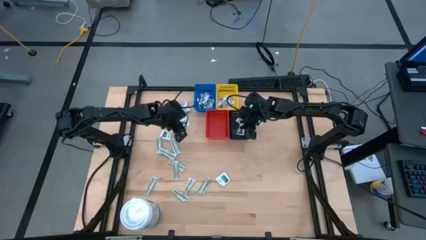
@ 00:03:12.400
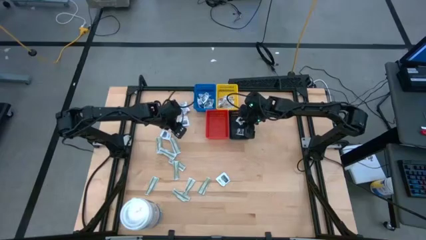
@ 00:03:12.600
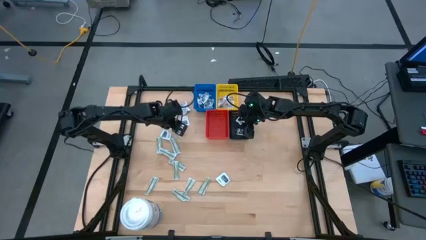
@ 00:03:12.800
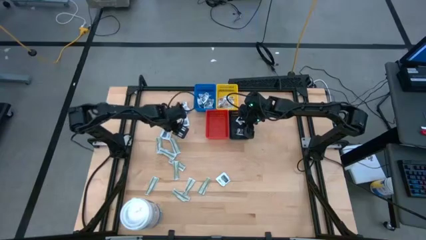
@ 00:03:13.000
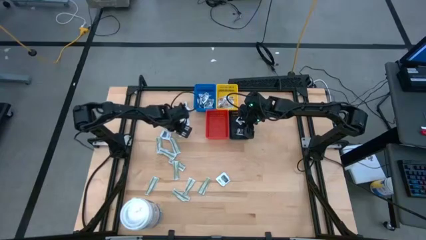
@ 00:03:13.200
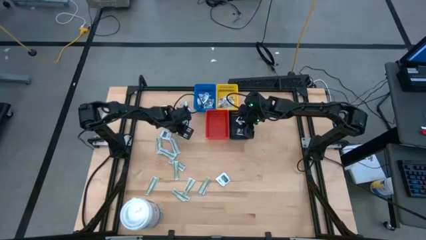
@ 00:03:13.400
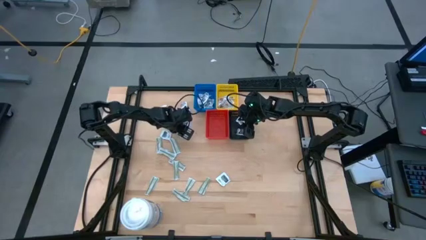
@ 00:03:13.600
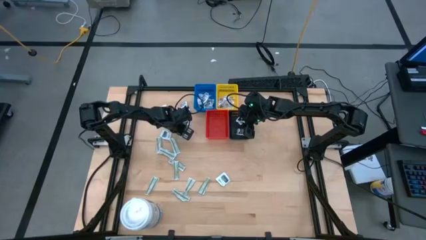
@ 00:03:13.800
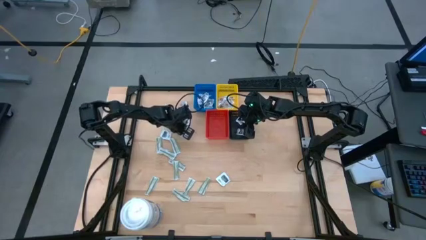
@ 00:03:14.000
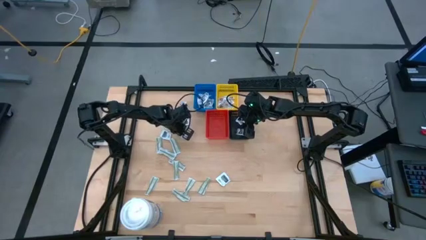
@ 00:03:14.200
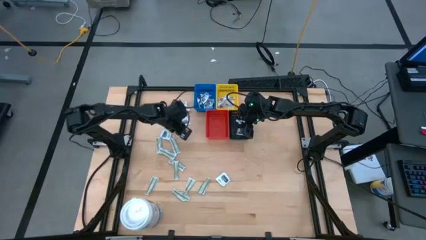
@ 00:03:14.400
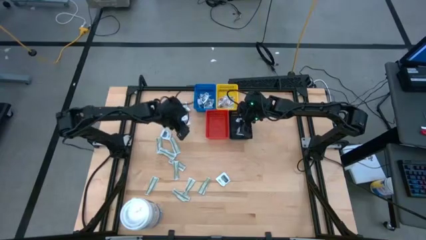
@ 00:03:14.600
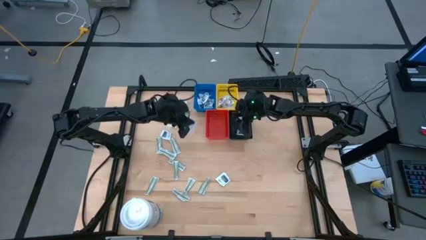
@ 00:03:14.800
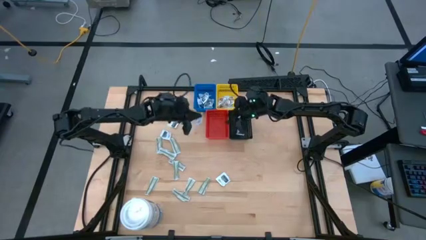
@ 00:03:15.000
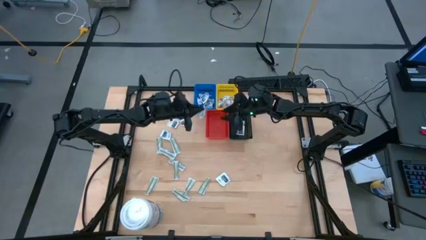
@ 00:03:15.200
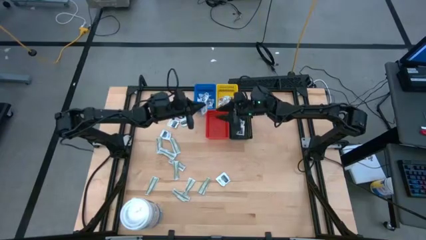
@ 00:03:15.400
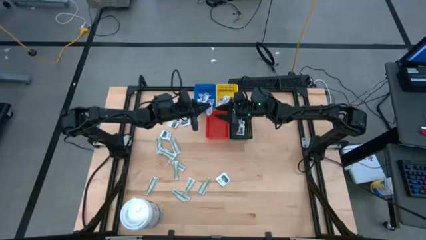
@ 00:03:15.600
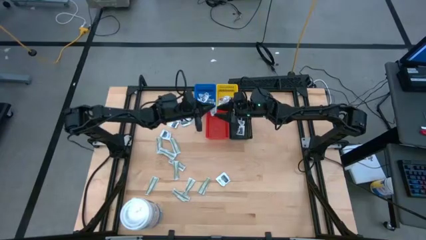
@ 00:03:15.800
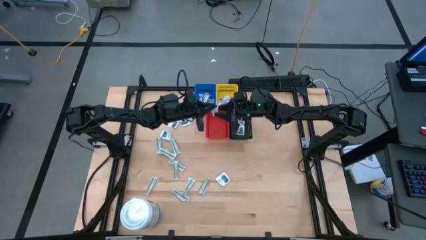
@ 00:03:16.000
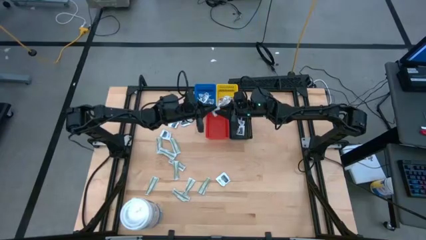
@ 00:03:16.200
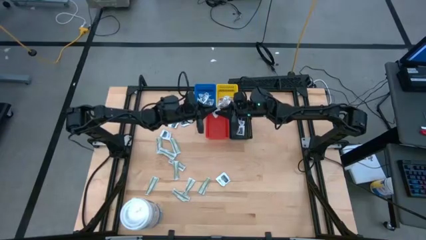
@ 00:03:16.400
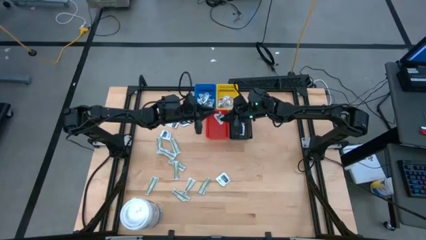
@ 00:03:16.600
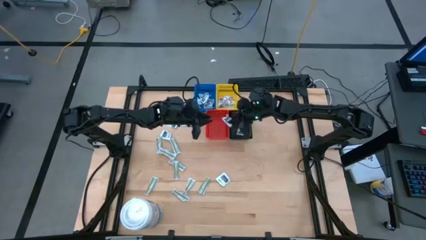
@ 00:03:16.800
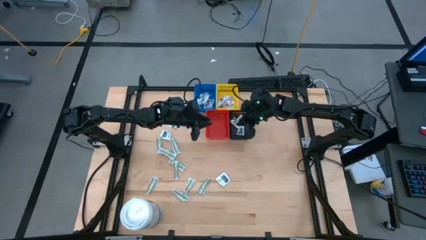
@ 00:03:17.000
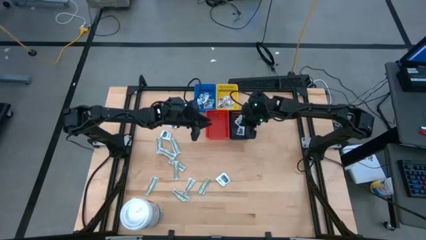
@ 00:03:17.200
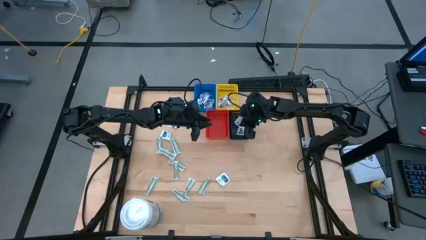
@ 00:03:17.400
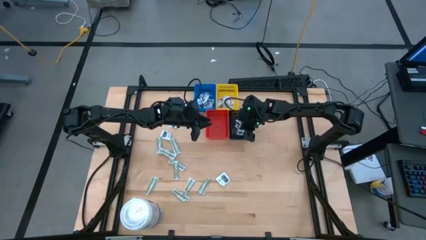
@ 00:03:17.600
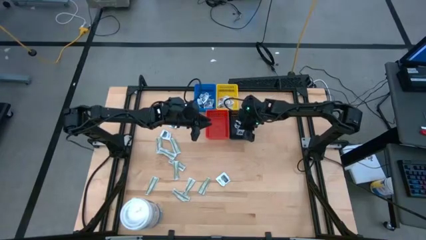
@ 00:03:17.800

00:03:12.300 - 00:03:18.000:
Task: Pick & Place First Aid Supplies
Put the towelette pack into the black bin

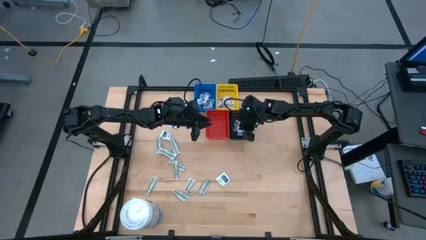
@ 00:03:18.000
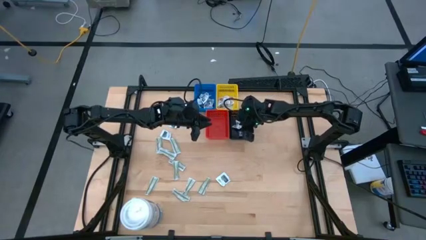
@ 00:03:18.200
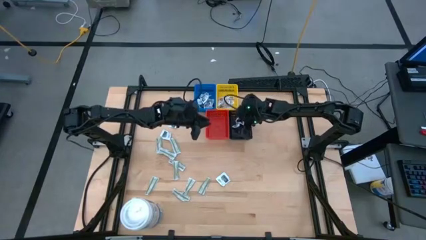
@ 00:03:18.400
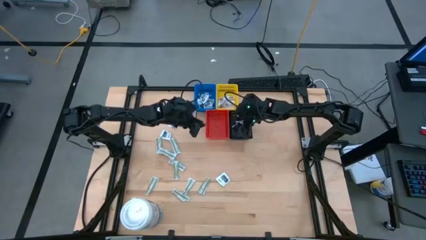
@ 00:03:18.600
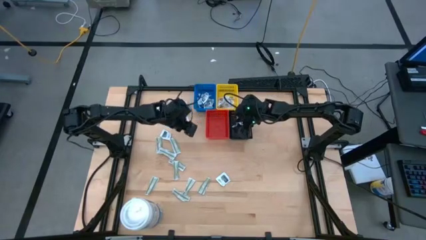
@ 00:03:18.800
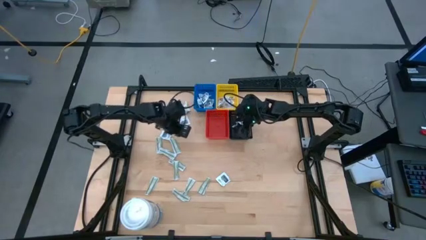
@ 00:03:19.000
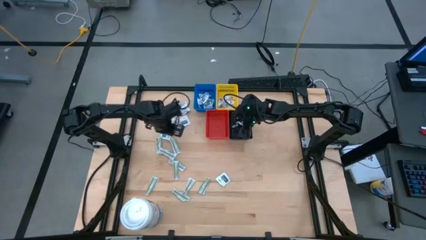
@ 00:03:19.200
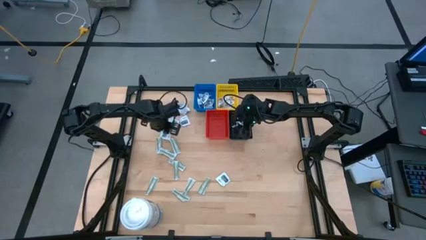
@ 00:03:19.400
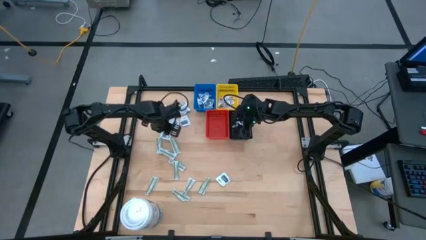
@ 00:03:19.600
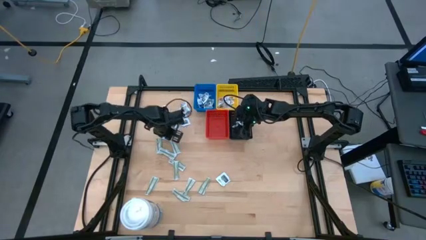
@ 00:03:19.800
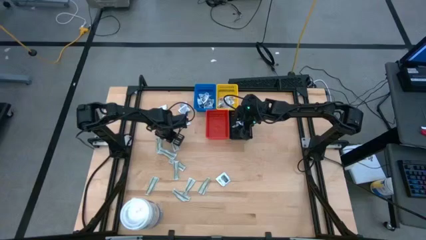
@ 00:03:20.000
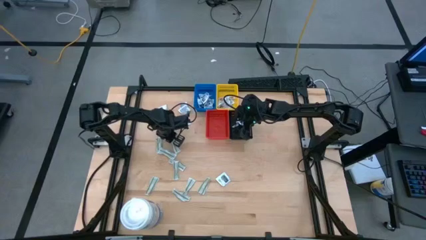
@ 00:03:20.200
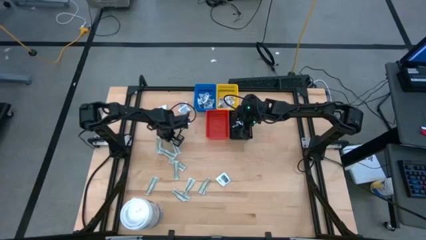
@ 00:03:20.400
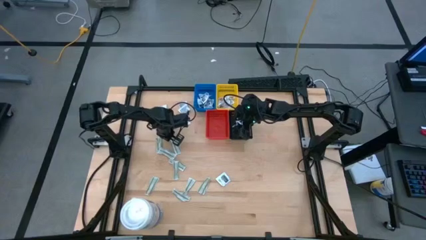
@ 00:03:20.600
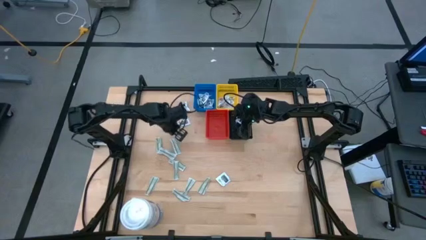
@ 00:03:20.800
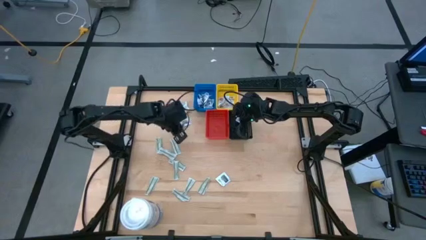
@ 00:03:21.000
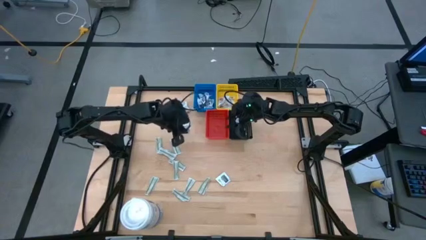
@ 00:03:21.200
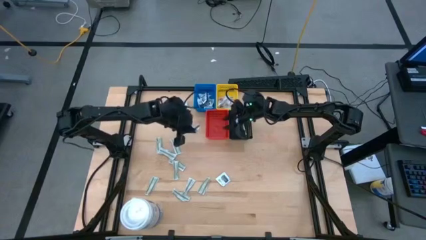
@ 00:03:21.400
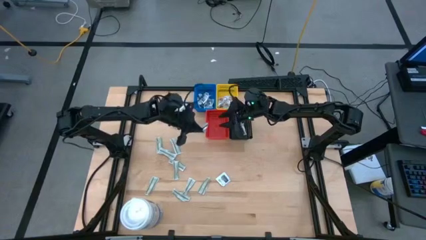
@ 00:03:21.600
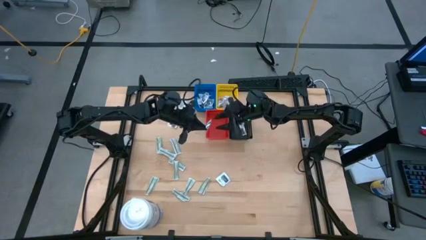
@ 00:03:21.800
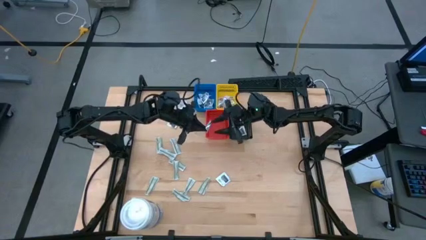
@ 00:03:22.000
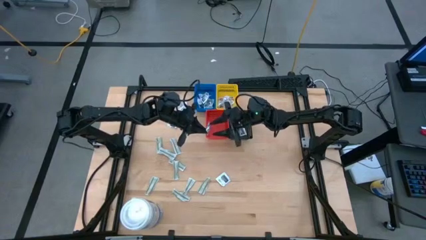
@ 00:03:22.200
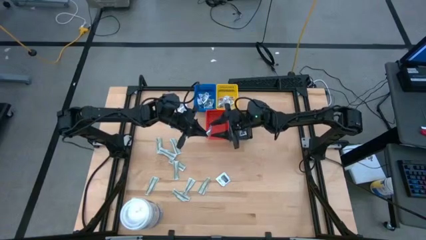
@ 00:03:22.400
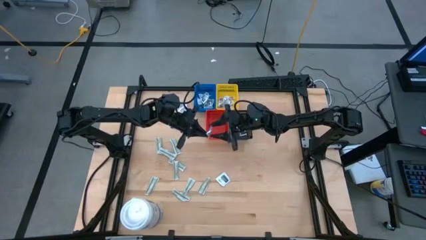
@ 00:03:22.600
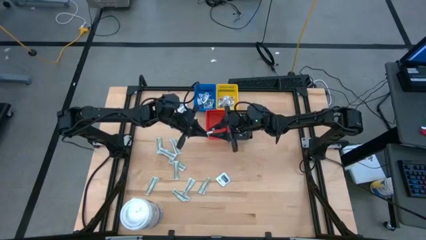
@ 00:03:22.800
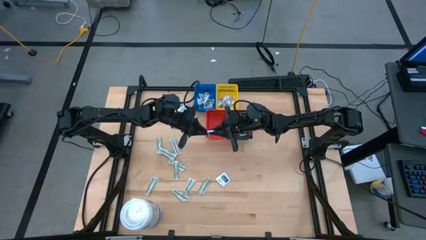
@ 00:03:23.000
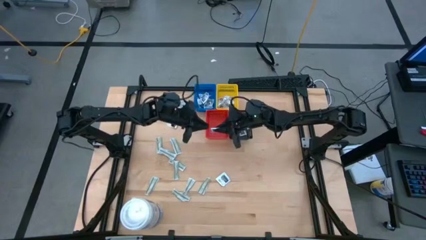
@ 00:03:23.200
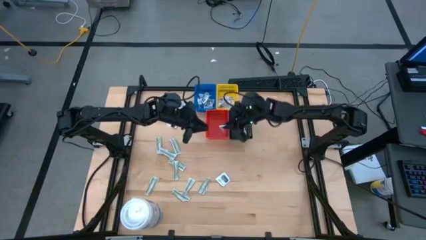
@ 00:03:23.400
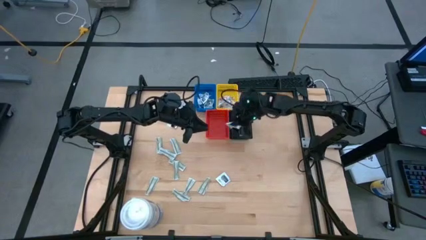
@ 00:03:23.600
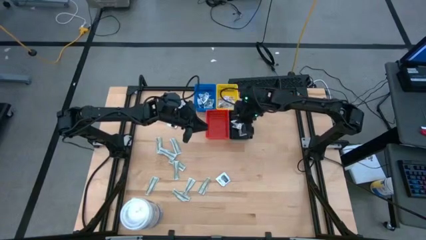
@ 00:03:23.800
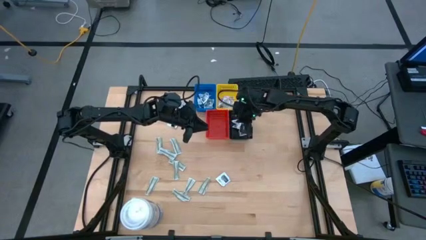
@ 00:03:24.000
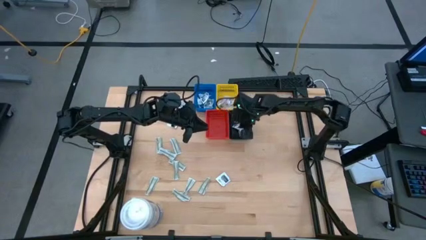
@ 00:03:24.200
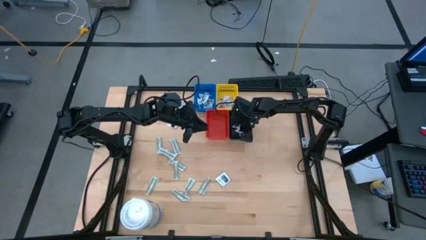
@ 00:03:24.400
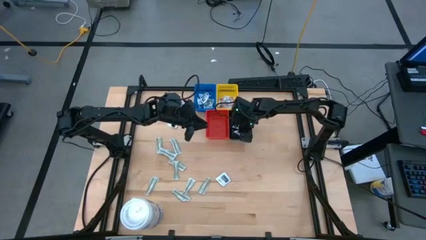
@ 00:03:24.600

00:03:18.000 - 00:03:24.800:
Put the towelette pack into the black bin

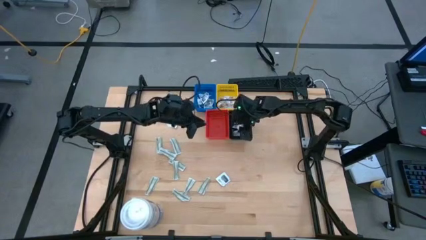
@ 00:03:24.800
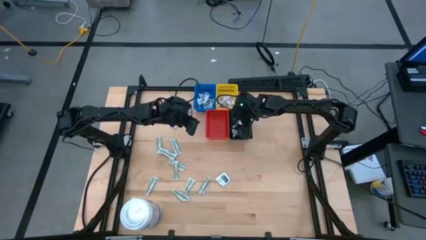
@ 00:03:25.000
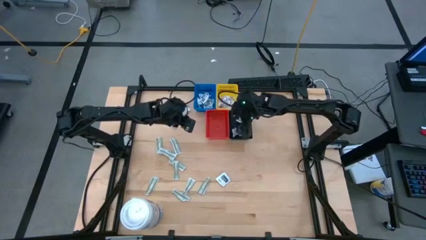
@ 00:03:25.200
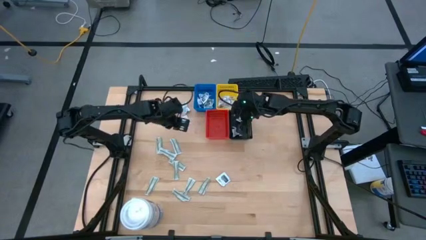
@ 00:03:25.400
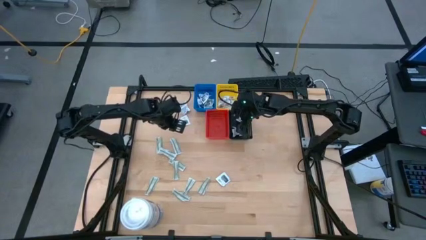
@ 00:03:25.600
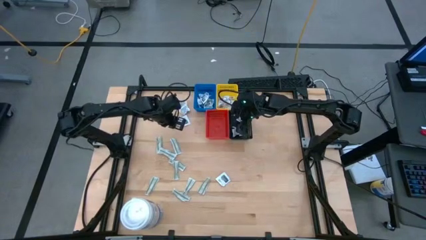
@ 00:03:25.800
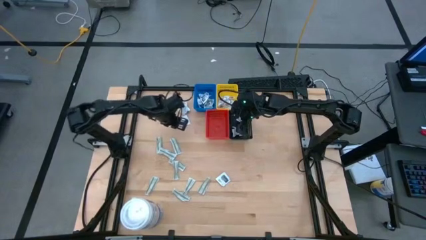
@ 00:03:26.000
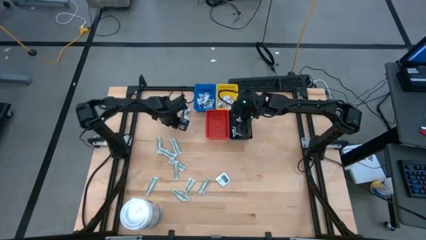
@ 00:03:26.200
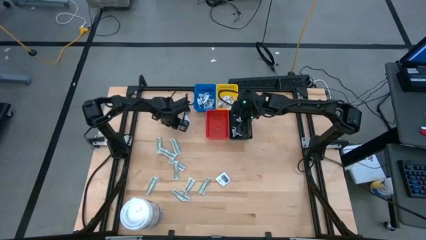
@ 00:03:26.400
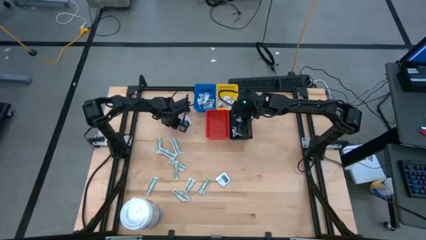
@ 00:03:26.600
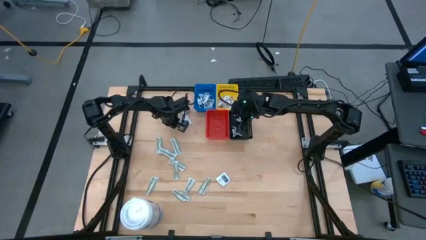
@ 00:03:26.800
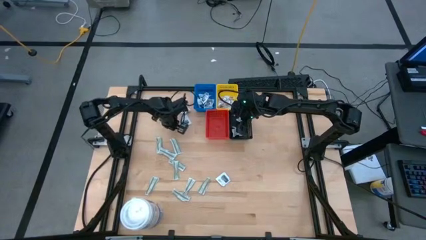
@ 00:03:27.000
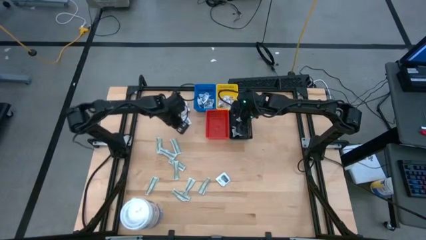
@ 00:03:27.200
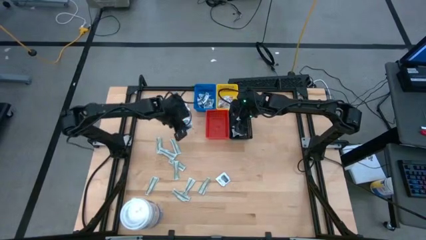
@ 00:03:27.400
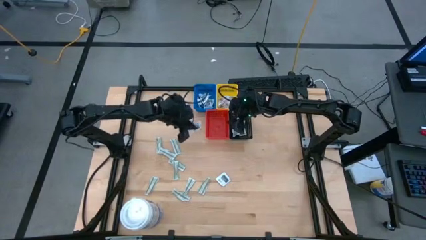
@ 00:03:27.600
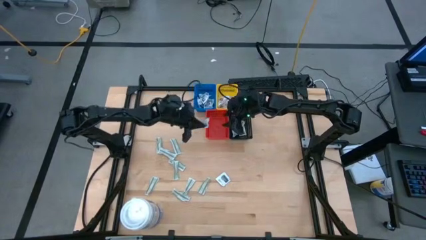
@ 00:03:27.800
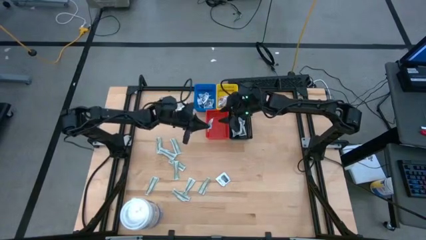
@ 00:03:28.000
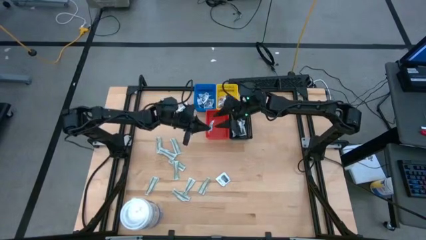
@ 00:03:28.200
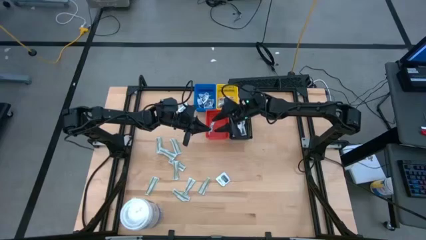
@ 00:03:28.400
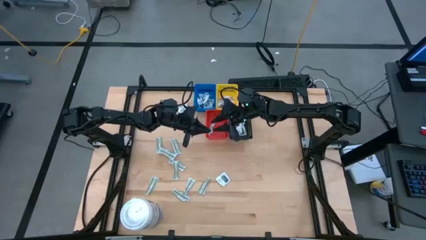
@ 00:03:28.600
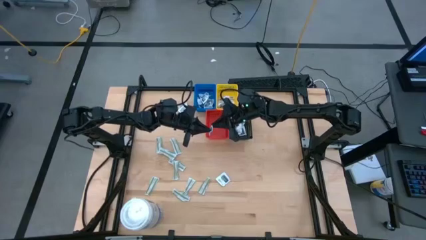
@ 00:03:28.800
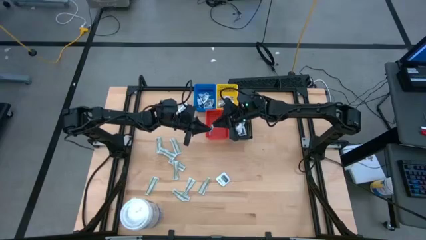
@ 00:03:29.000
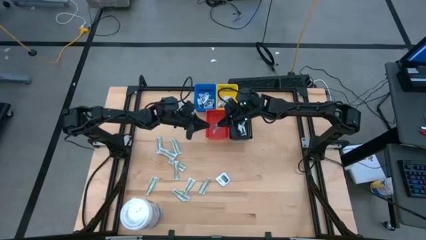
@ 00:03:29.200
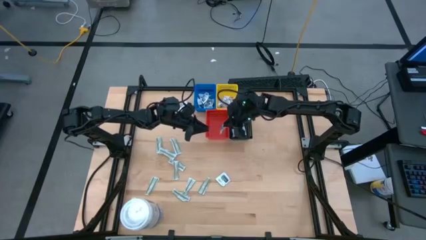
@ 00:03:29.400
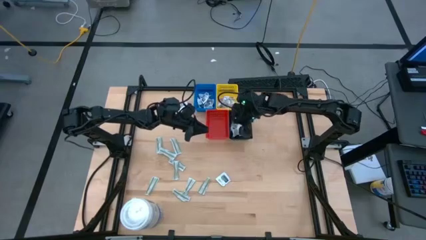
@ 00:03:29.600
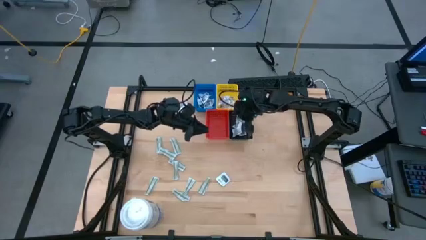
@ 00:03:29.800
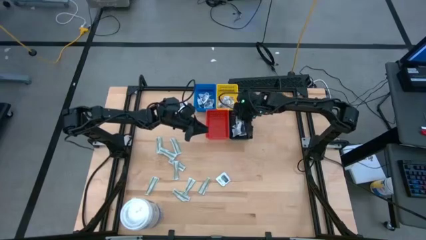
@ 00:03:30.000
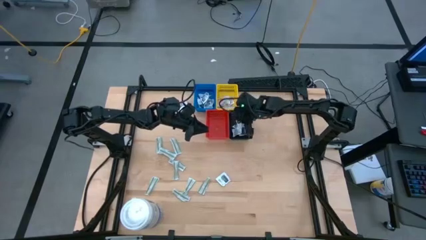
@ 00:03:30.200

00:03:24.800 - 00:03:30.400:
Put the towelette pack into the black bin
